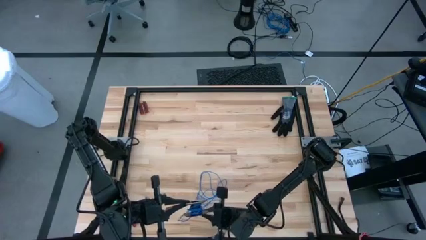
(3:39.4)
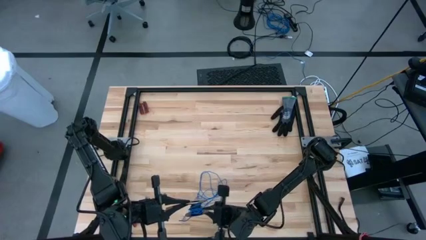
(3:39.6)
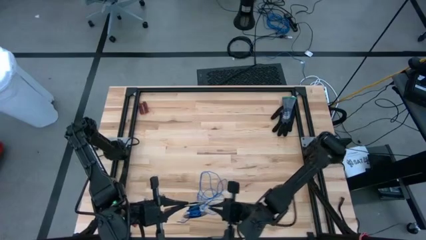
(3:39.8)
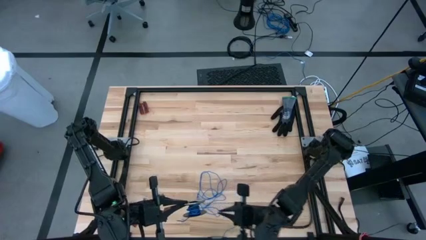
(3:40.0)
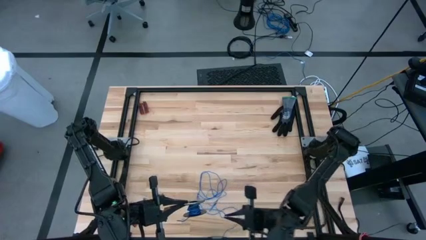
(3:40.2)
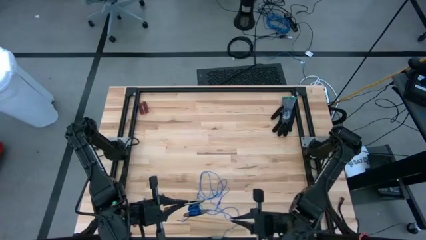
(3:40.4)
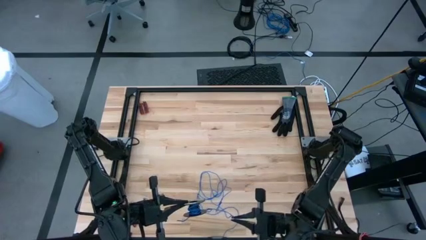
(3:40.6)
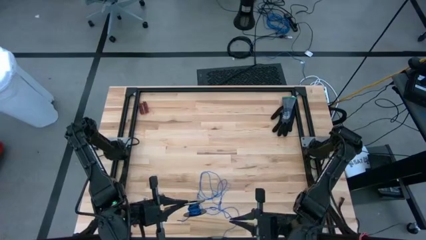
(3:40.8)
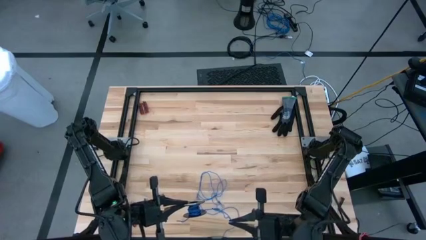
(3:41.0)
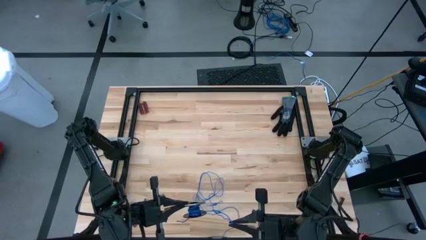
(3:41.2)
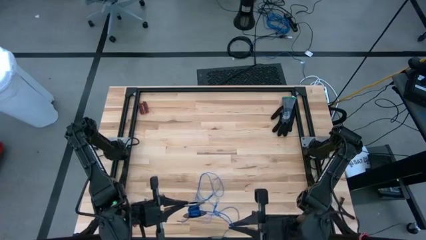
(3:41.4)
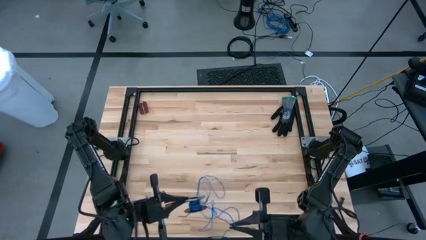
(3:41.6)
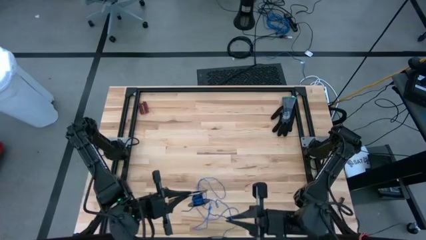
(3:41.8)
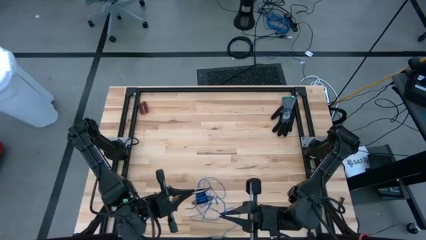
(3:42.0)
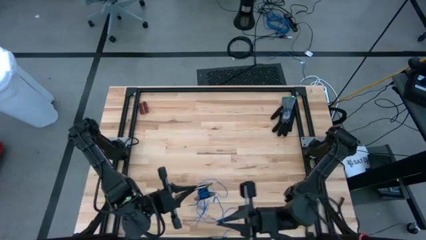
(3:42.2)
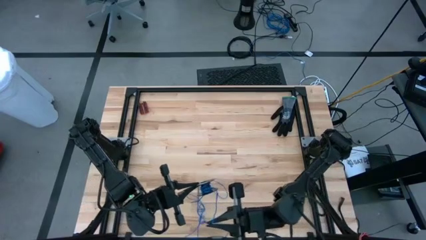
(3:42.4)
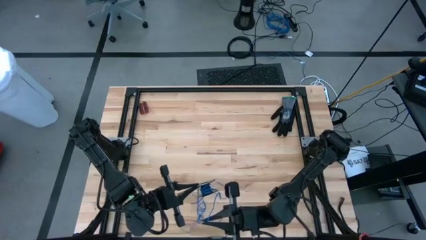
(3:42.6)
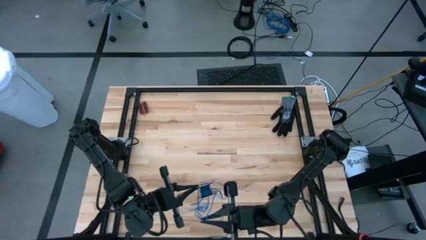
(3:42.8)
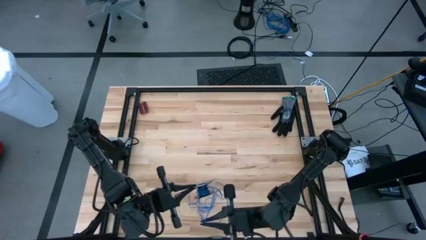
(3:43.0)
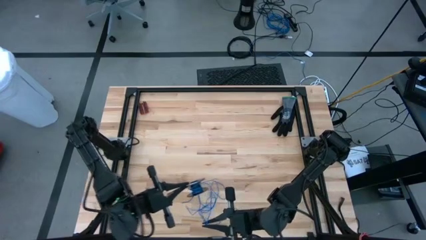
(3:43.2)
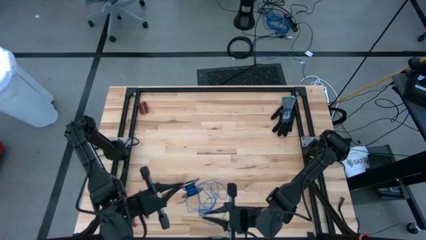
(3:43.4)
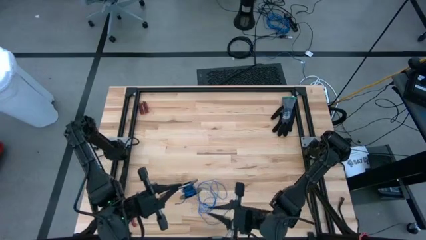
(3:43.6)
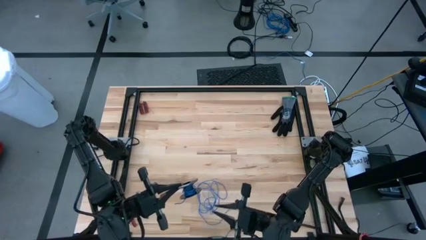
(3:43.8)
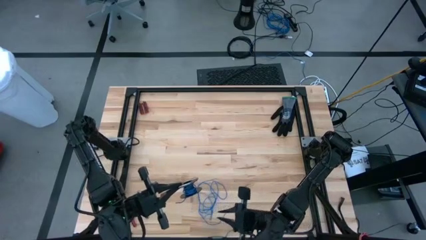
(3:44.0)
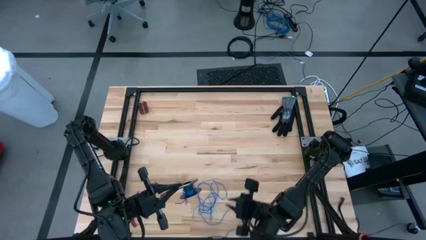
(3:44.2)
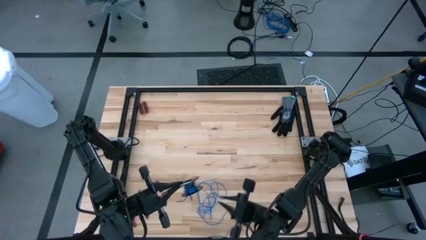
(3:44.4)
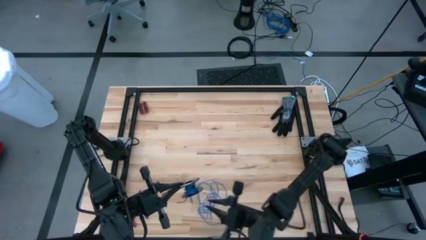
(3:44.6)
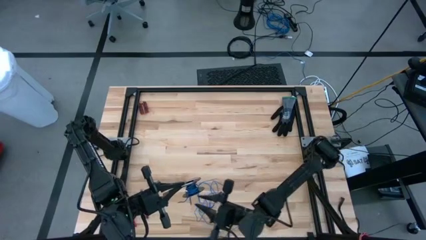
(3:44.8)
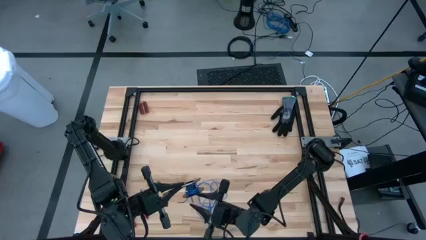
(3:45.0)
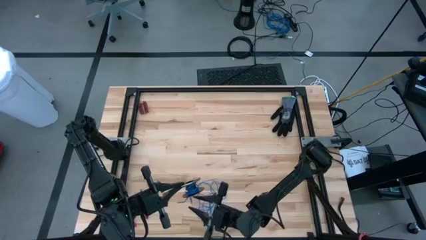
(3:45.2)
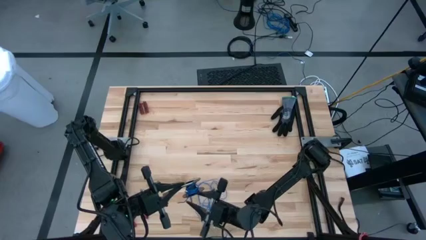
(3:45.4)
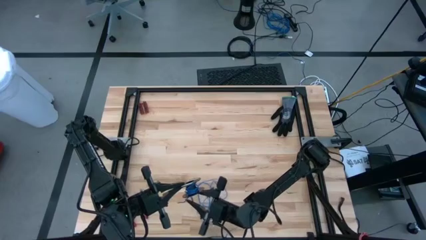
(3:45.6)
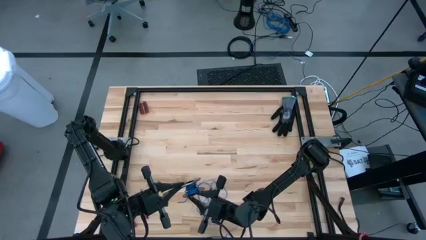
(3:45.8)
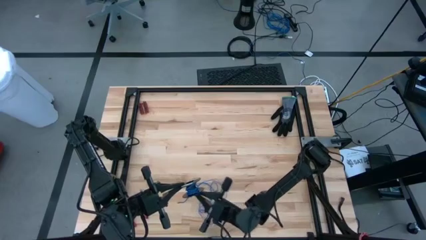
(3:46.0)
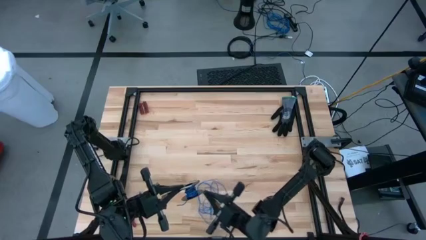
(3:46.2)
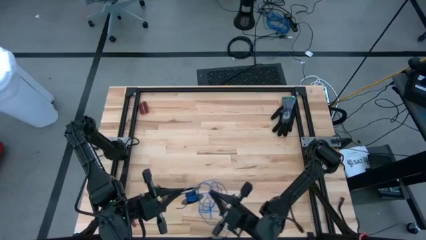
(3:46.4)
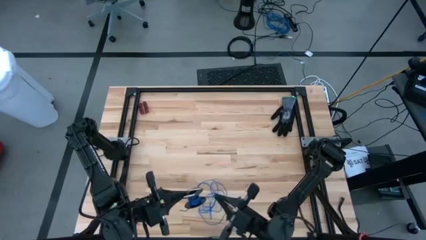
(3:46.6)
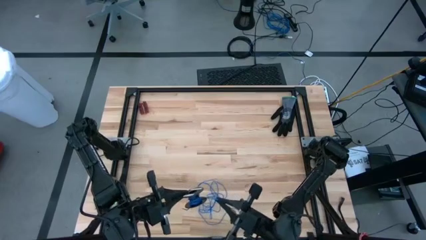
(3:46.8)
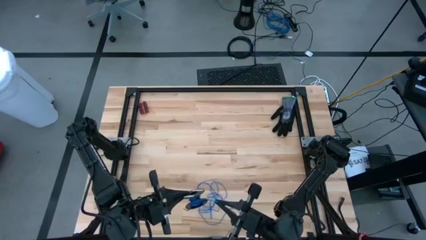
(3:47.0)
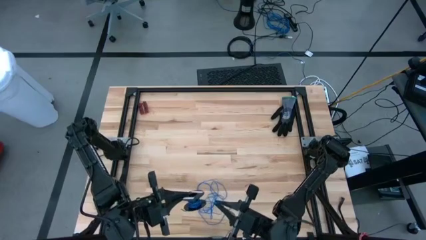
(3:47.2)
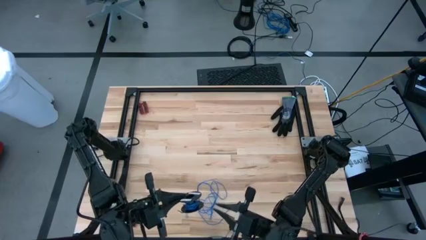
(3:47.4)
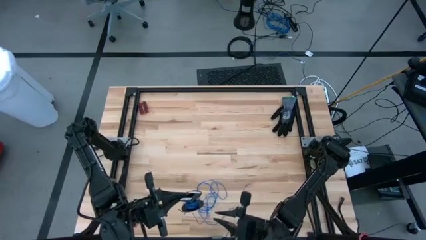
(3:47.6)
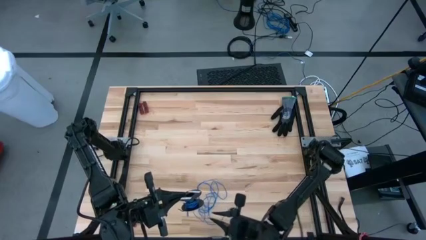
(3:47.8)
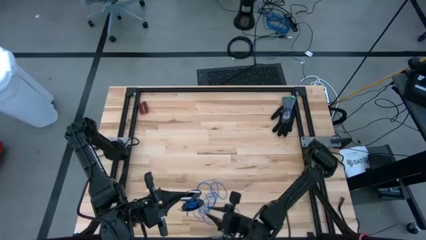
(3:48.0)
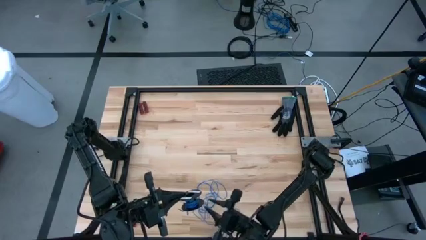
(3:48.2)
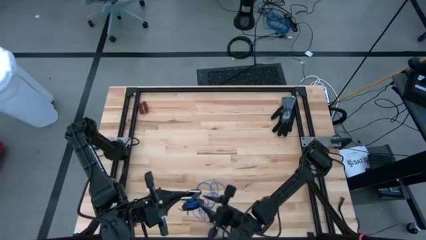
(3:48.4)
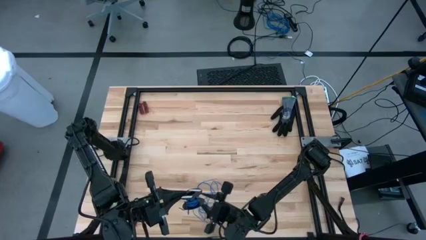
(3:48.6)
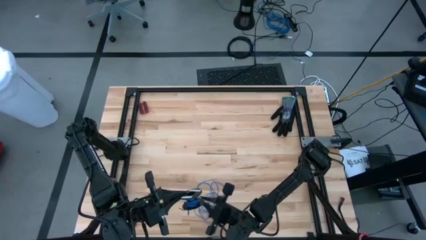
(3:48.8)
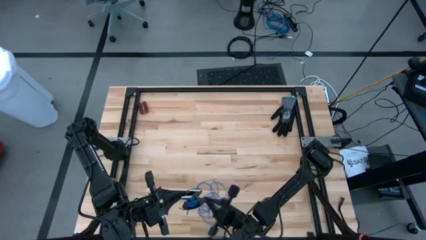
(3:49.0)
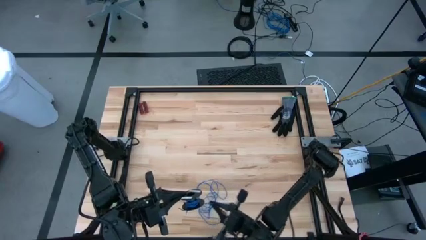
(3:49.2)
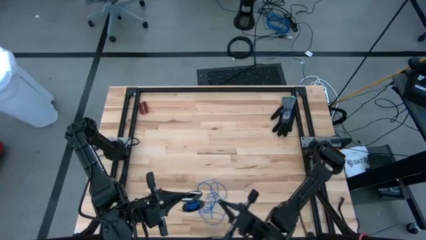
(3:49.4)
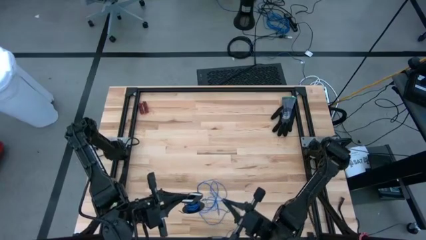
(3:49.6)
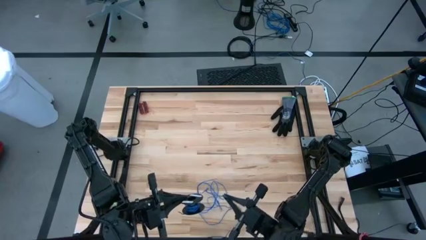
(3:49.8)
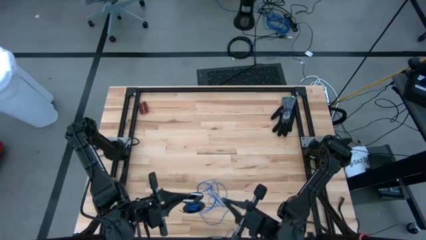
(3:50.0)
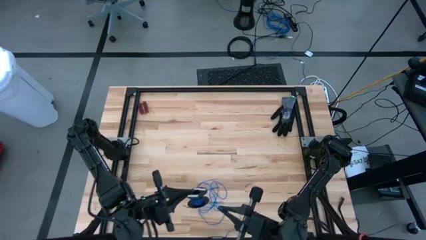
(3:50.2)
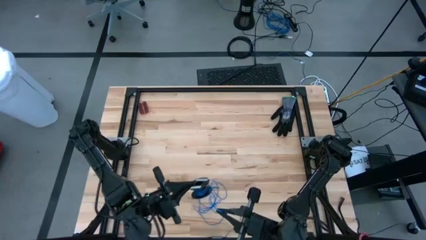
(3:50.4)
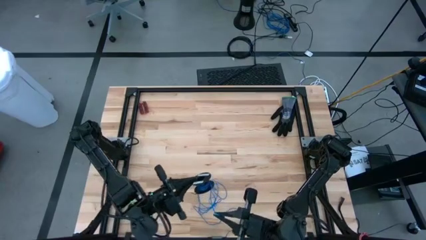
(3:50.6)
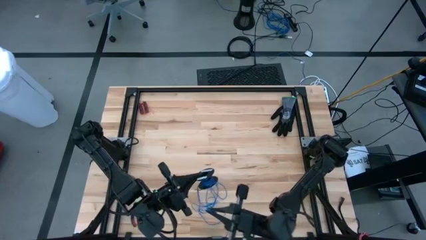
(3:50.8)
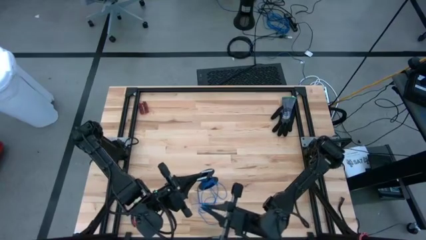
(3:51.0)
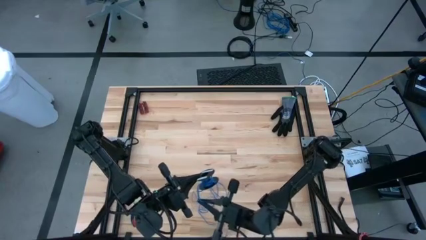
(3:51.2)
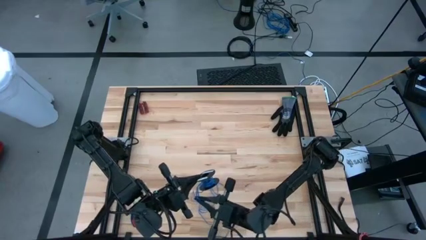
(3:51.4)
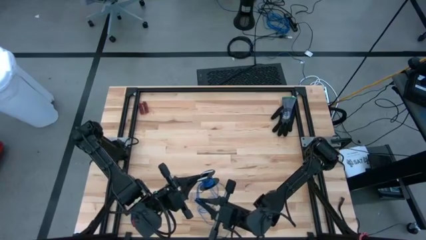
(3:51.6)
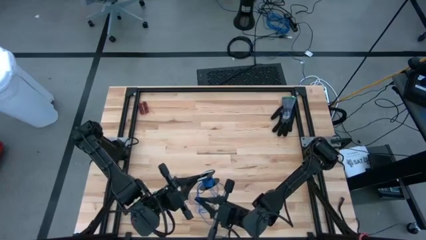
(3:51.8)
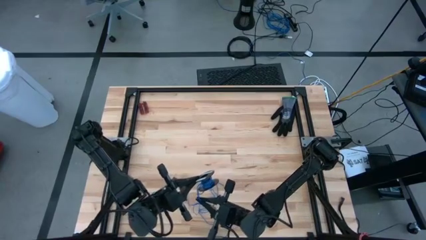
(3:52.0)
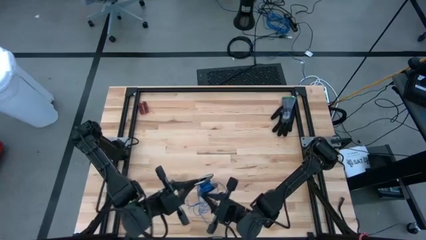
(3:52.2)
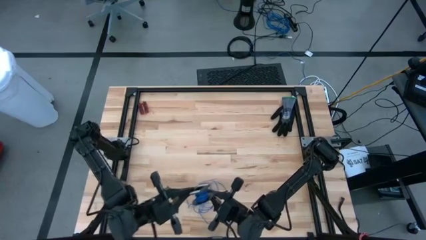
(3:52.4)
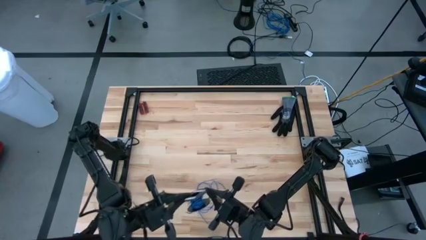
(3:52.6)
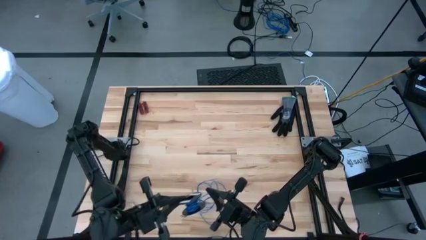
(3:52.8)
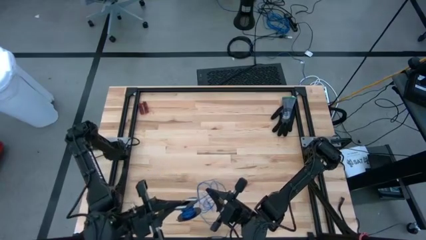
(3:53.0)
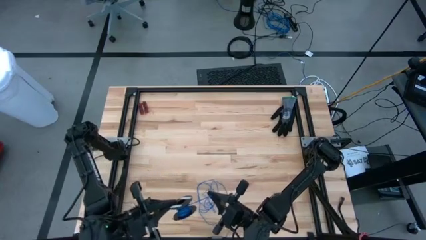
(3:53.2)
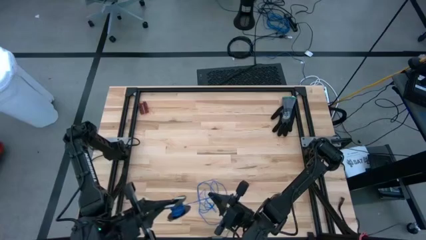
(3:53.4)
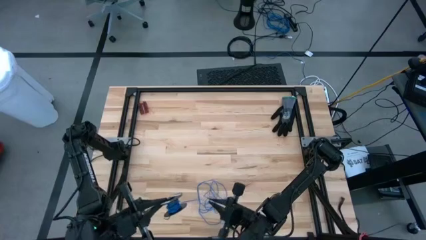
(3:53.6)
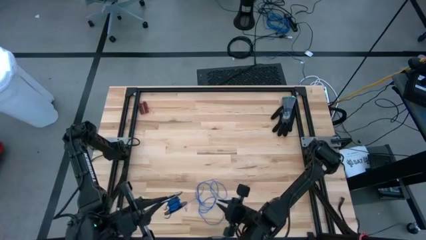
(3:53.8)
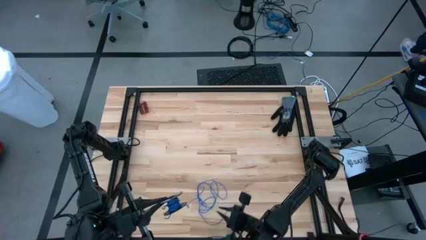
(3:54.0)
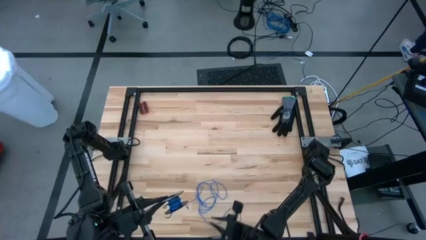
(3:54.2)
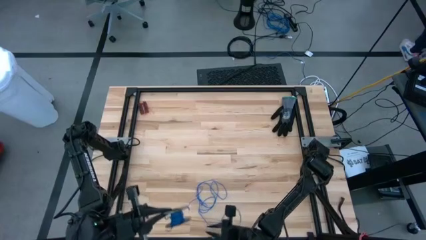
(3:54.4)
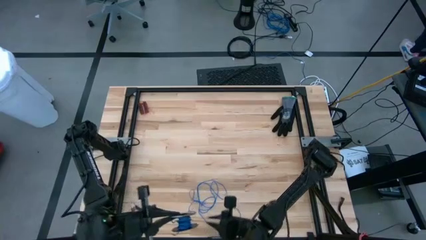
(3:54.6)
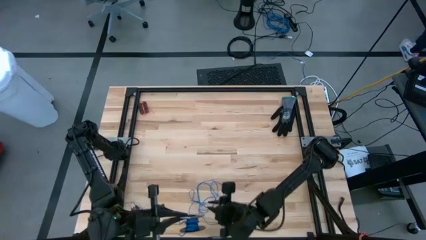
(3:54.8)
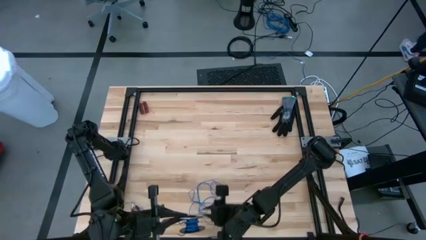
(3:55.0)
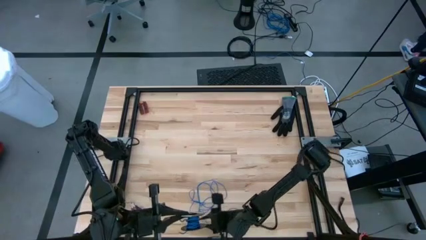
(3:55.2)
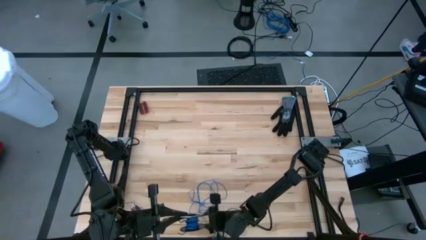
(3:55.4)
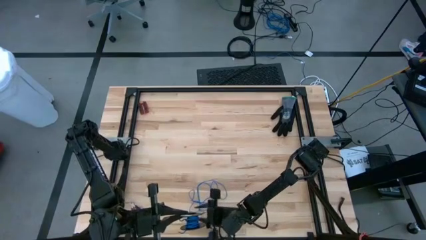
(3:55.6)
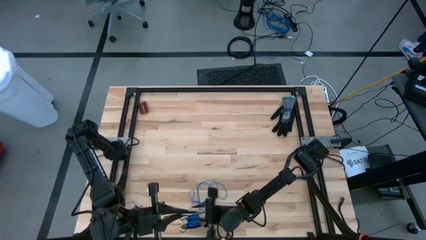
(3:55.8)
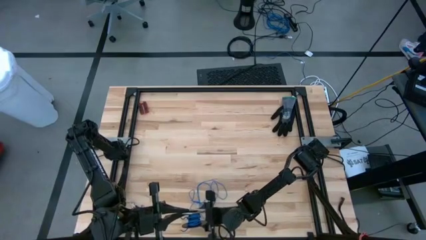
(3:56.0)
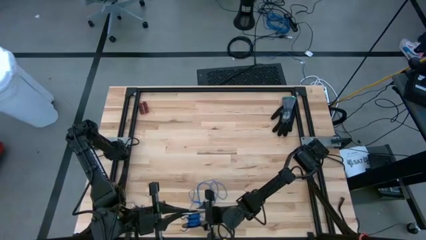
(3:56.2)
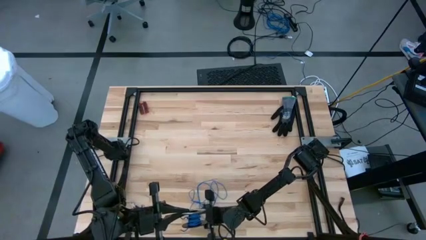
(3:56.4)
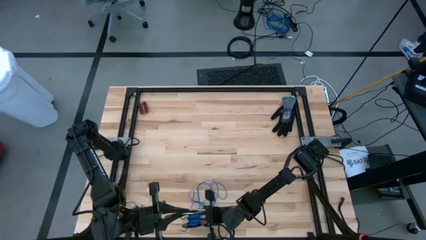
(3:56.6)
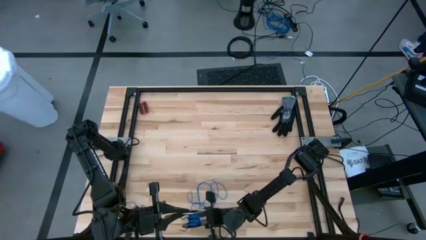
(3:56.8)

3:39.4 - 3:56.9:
Task: Coil cords
Coil the blue wire onto a spool
